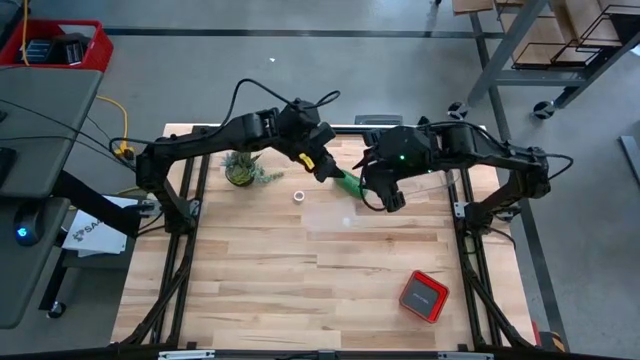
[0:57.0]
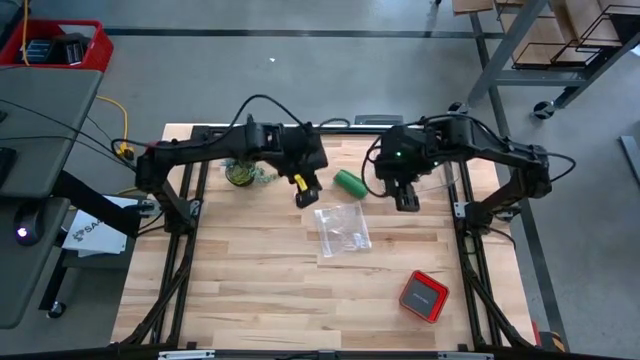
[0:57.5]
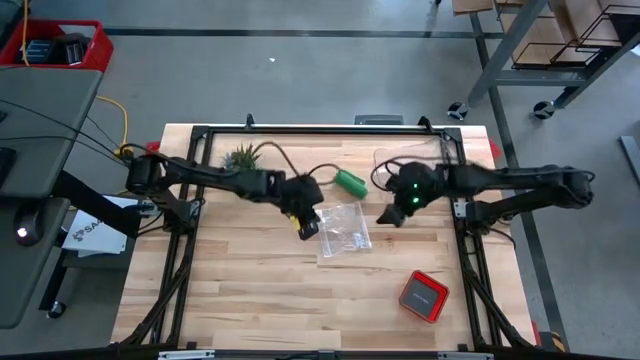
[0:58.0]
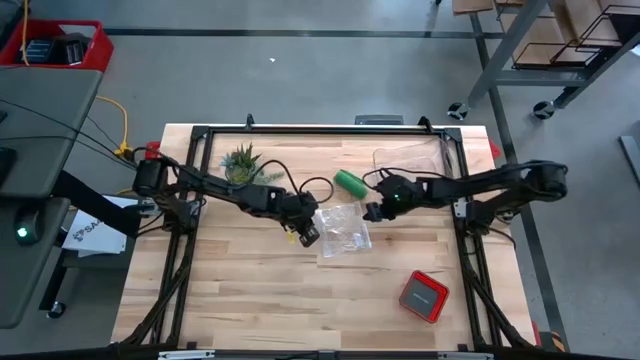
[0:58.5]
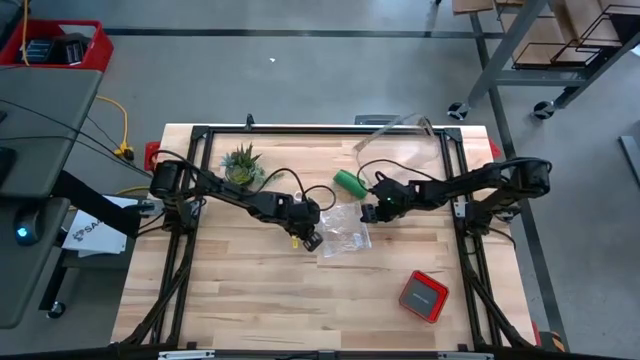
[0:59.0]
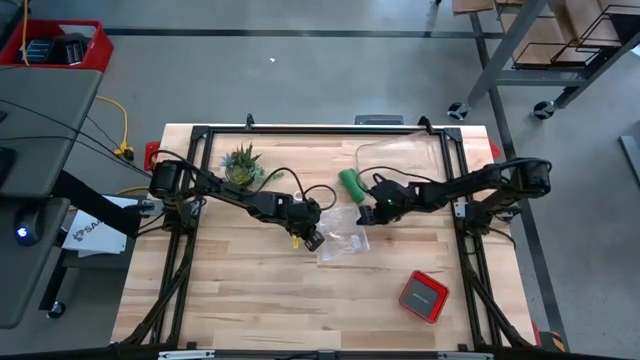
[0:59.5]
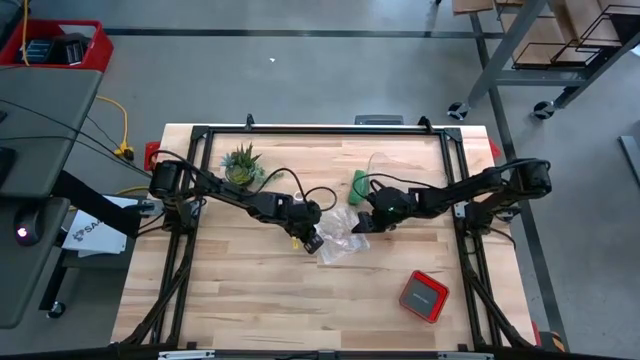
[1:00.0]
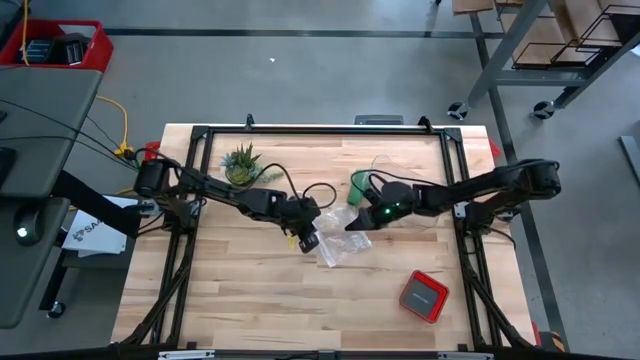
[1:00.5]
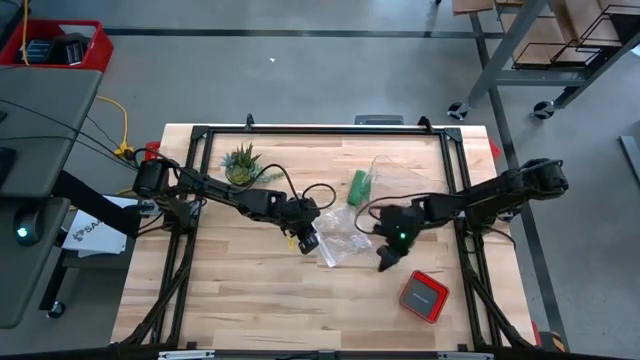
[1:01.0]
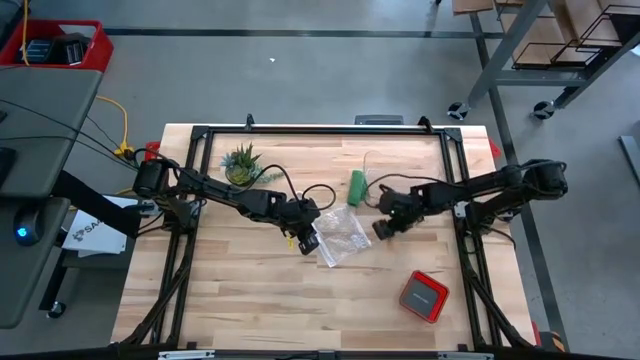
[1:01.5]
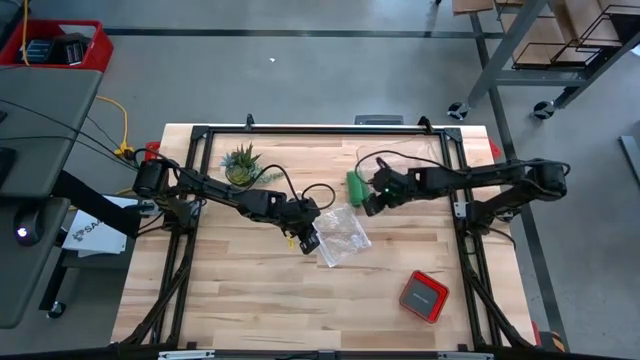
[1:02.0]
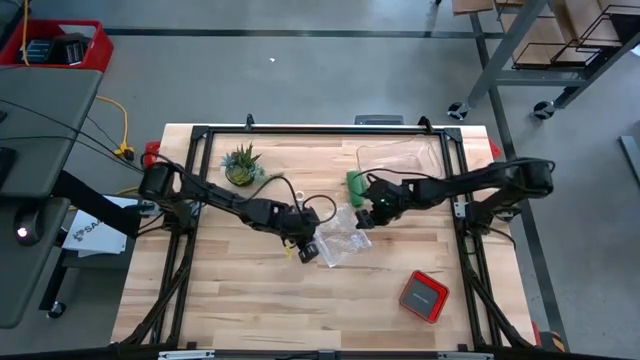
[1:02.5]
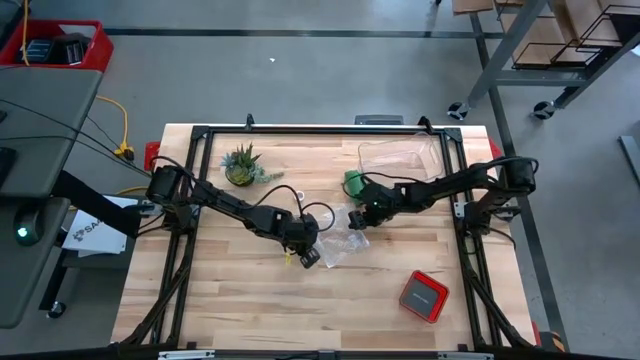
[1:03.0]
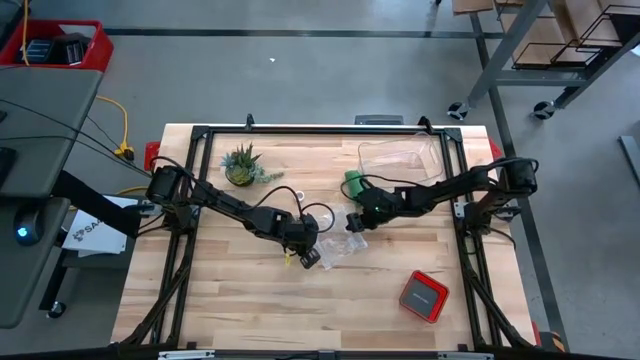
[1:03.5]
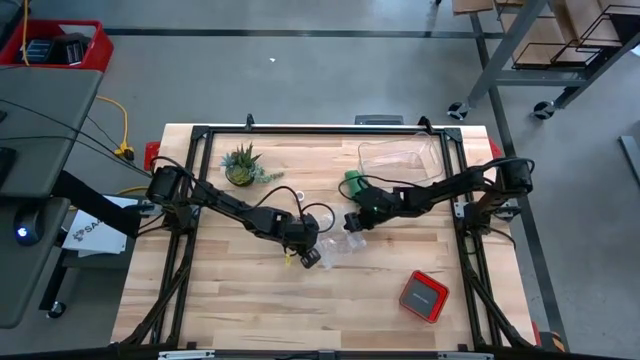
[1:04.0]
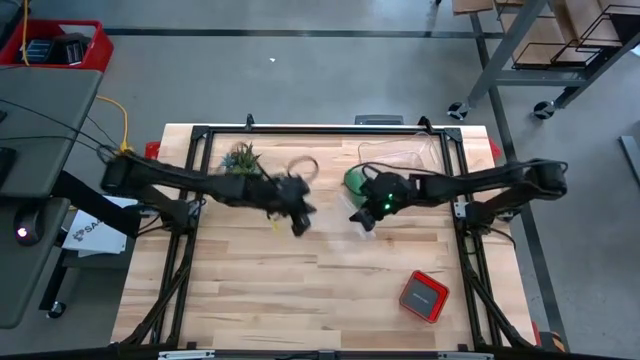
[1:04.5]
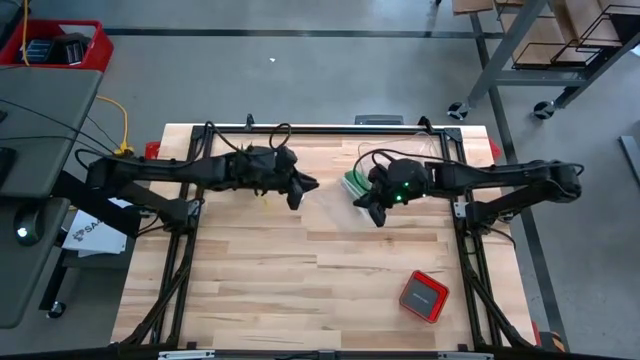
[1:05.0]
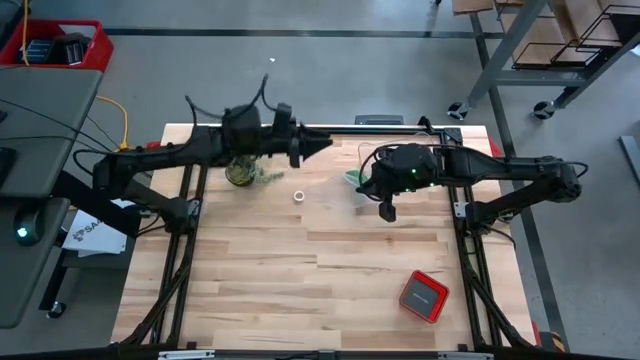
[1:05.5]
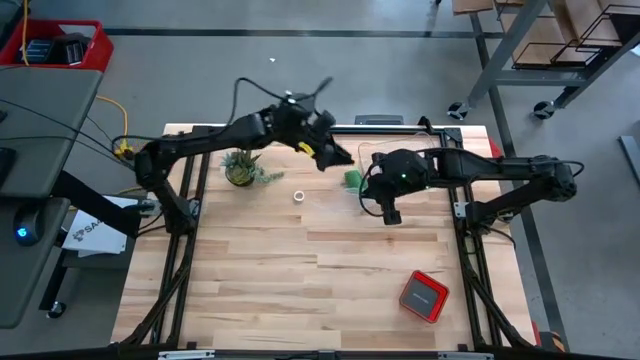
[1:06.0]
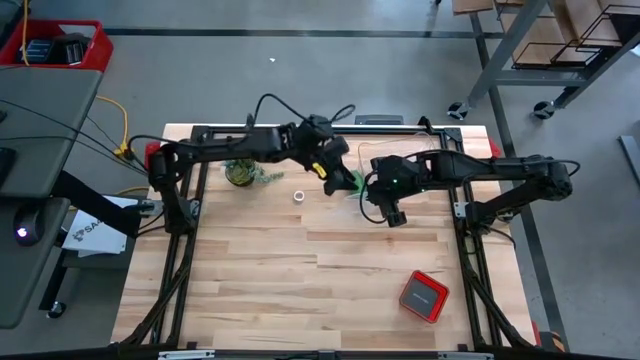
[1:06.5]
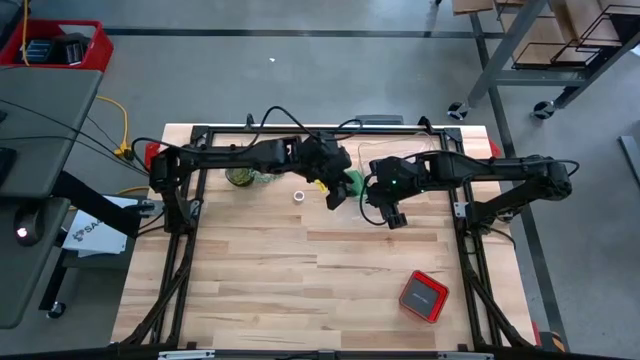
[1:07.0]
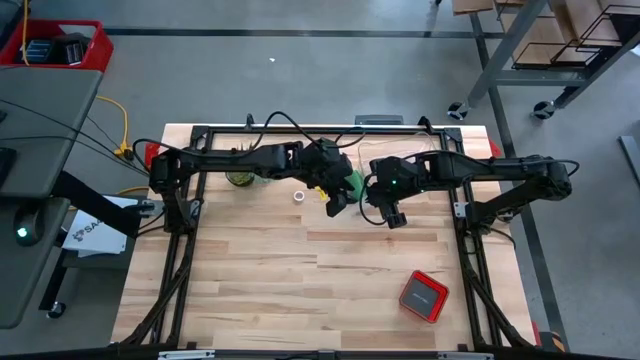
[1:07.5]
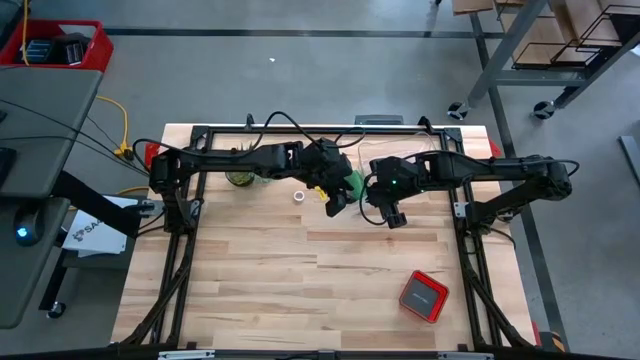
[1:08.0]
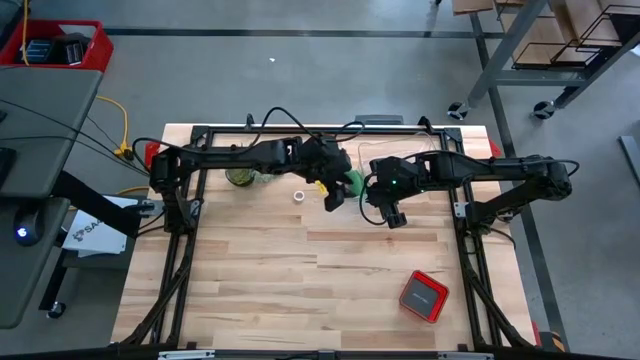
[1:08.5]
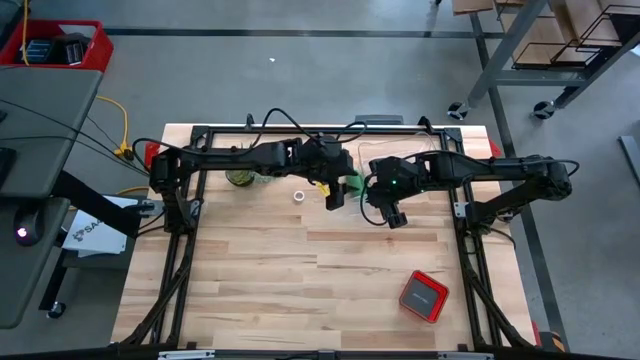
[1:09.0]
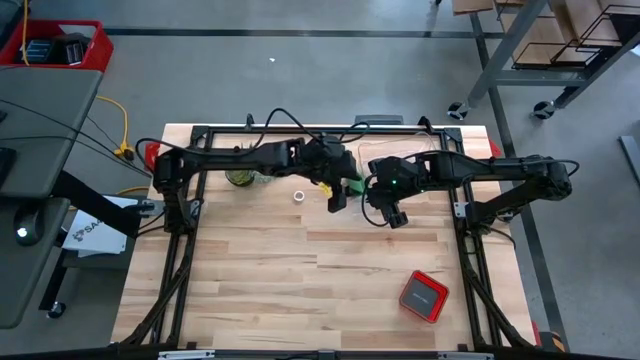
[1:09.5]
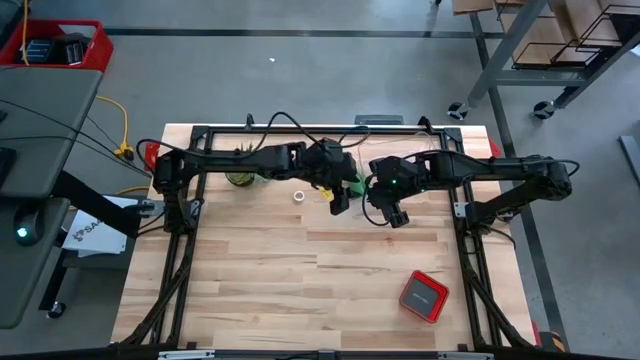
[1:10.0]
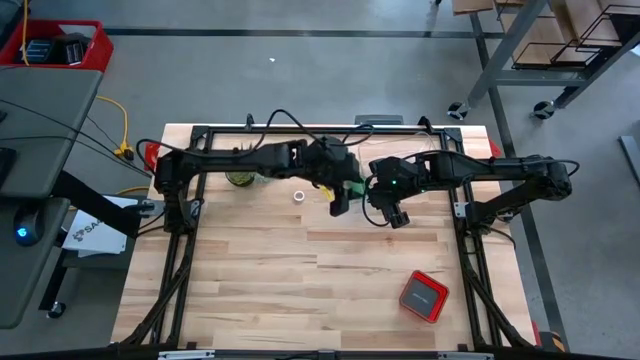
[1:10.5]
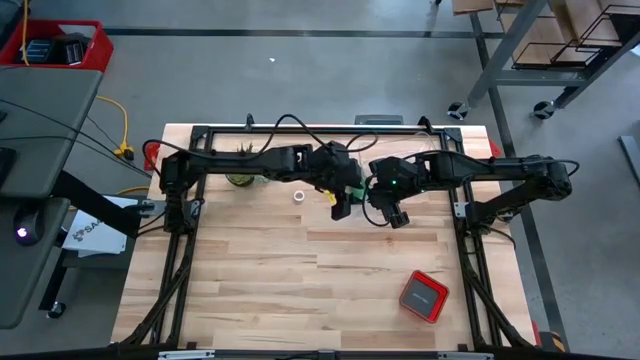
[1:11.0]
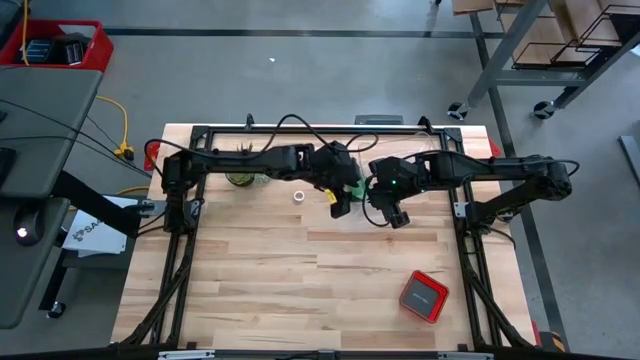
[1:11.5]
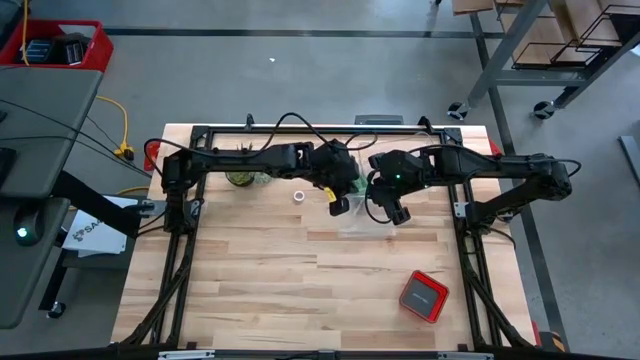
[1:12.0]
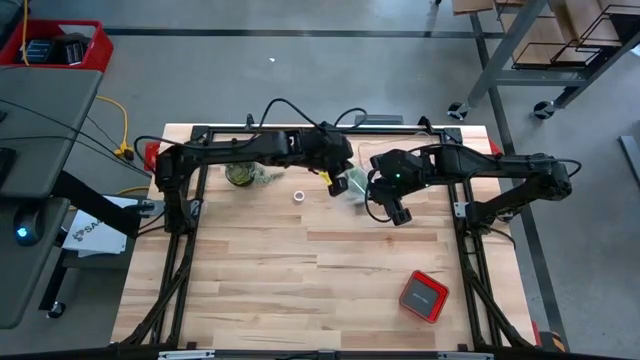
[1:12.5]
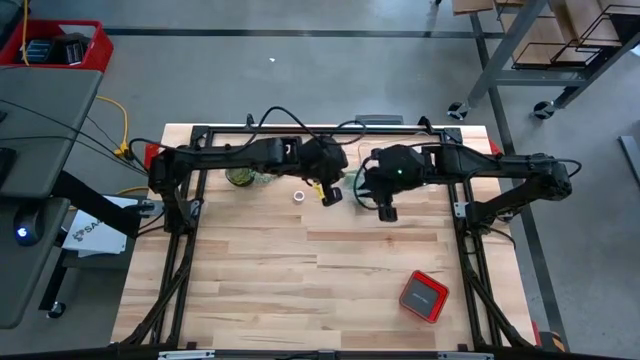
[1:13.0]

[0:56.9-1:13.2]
Task: Roll bandage
Open the transparent zip bag

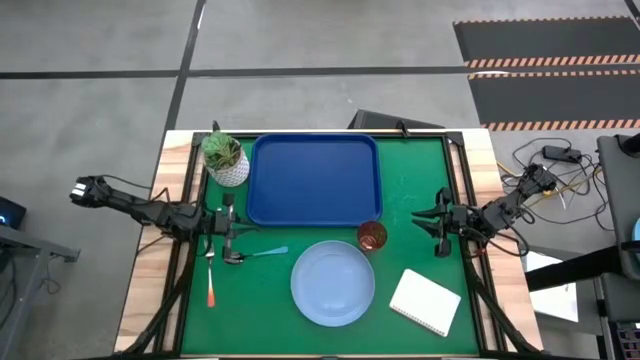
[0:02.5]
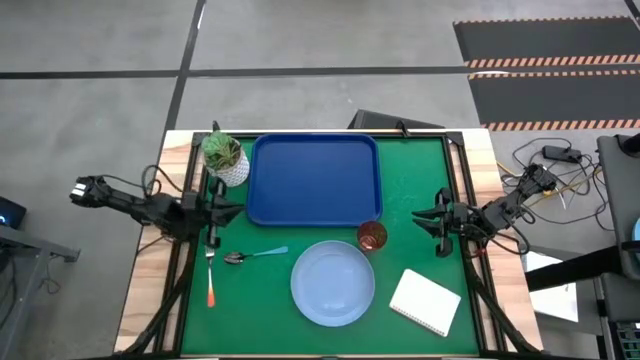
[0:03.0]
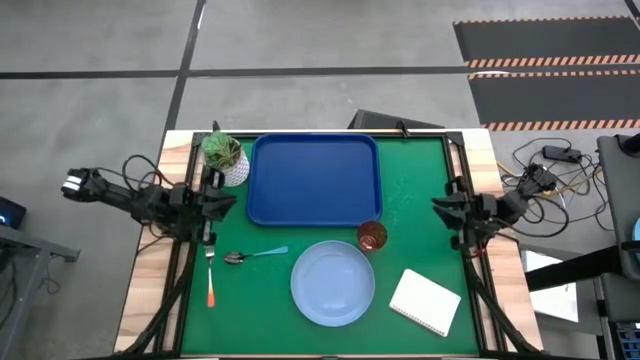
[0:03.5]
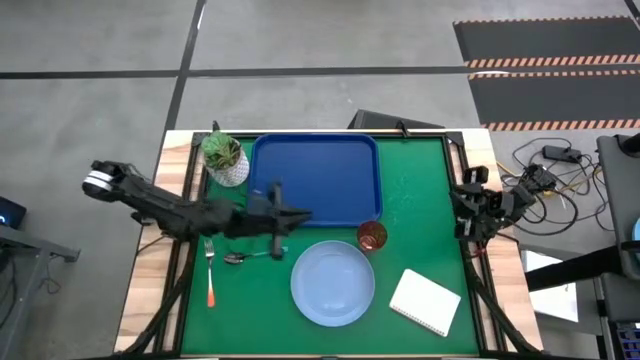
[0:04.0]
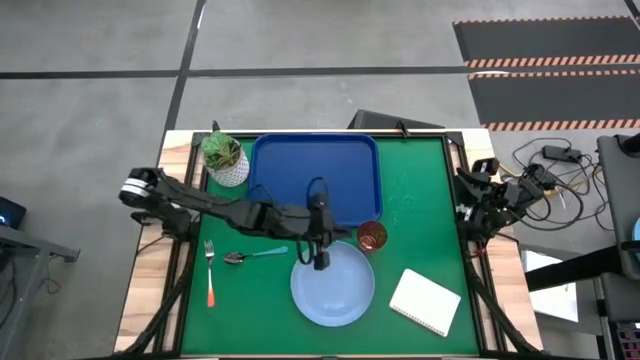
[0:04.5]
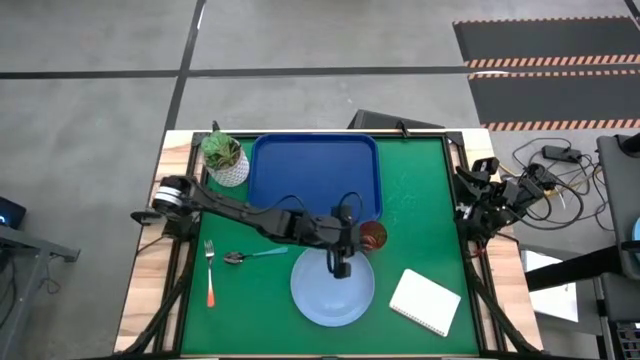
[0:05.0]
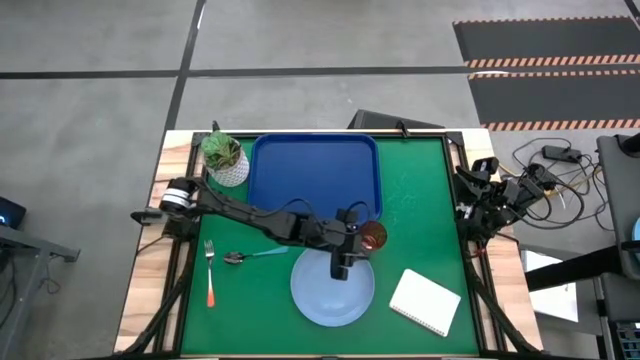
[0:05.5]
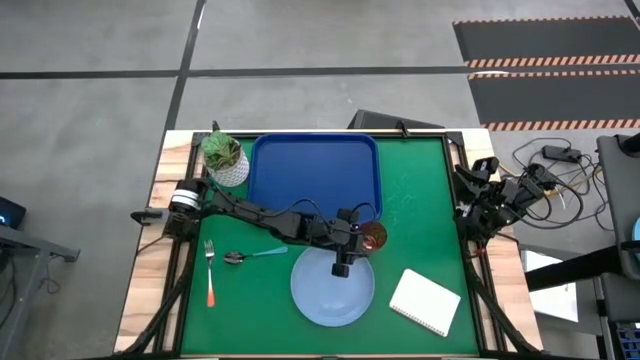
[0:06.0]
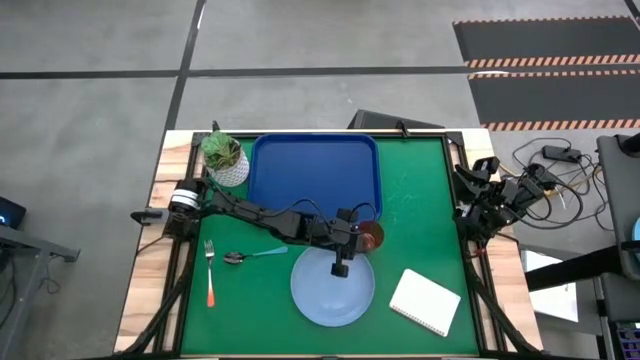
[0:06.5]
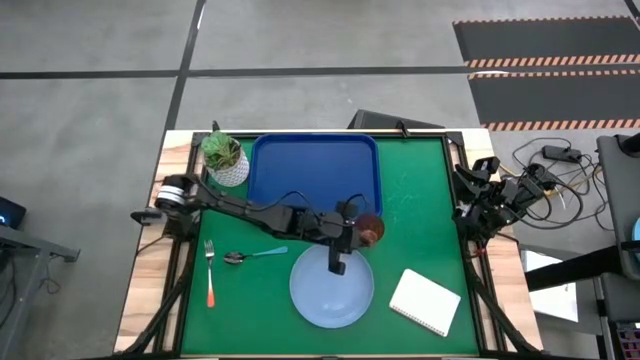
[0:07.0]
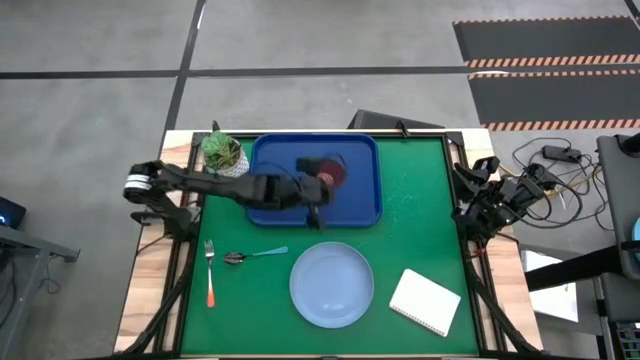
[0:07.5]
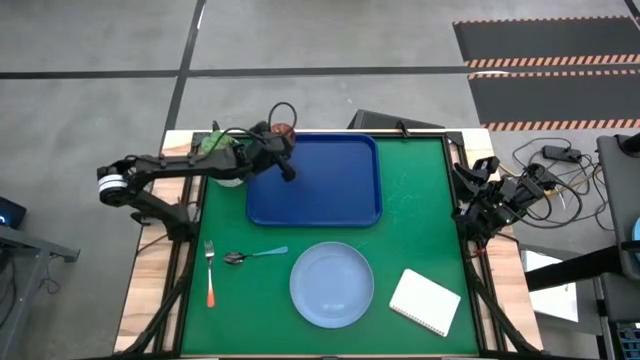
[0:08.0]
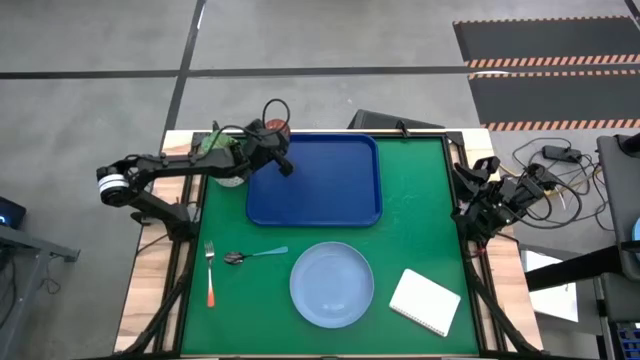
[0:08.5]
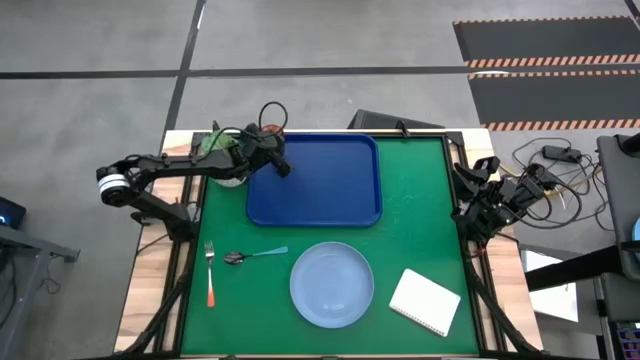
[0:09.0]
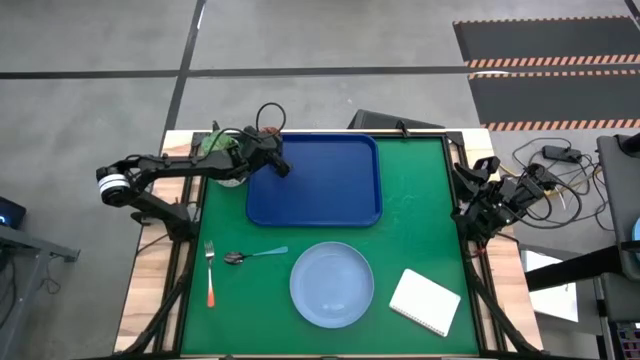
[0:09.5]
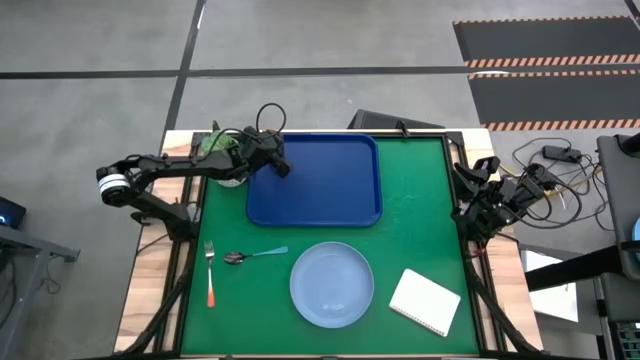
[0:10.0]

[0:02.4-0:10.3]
Task: Pick and place plate/cup/fork/spoon on tray
Put the glass on the blue tray
